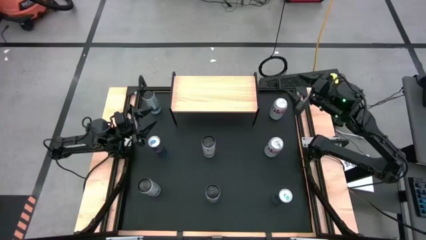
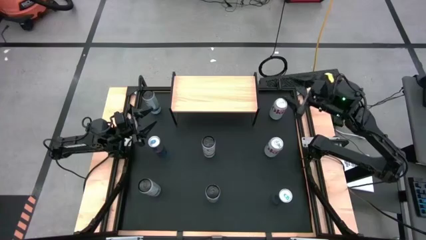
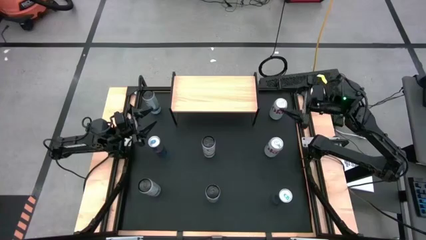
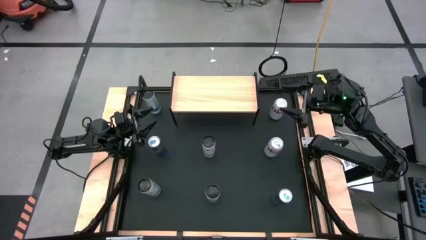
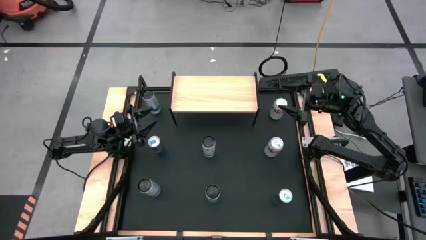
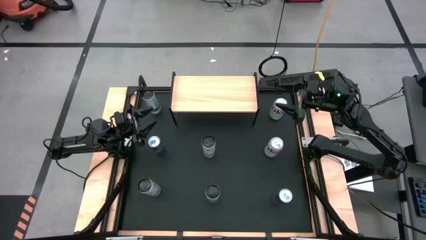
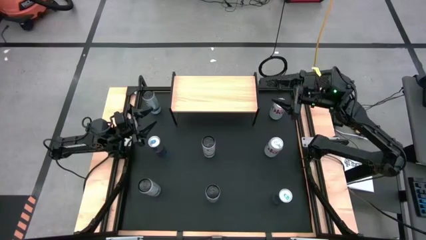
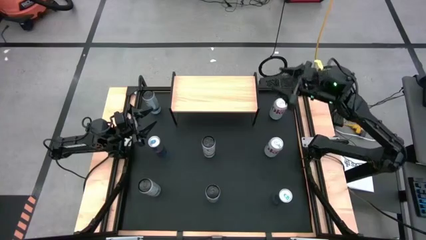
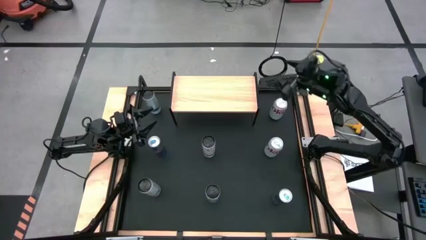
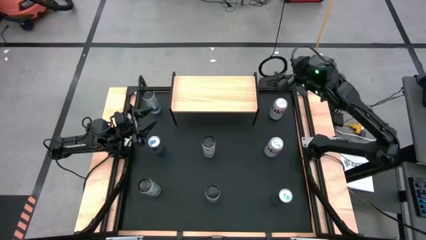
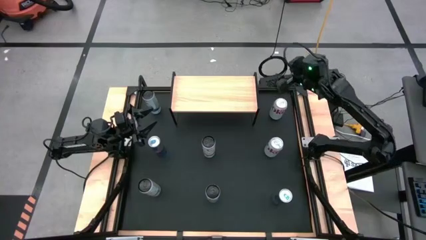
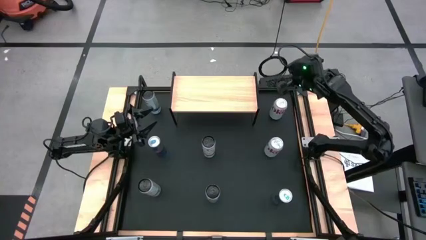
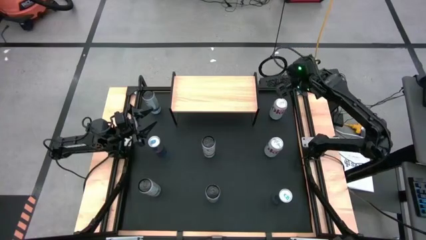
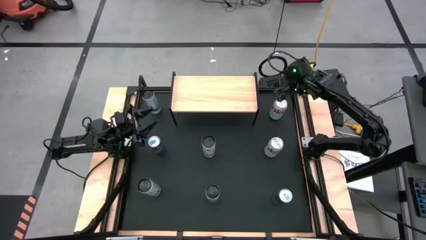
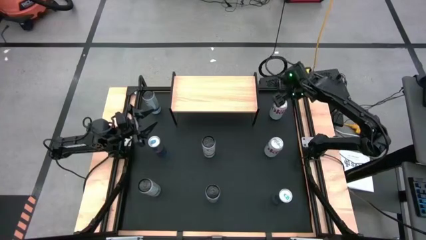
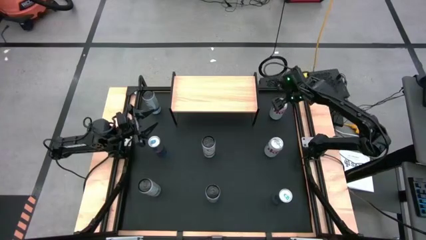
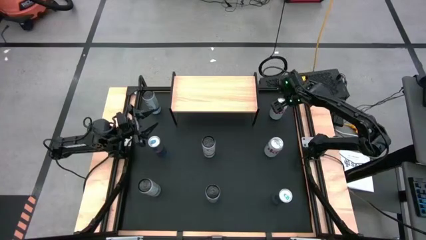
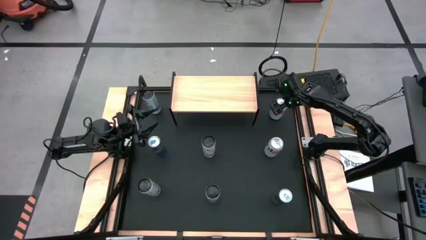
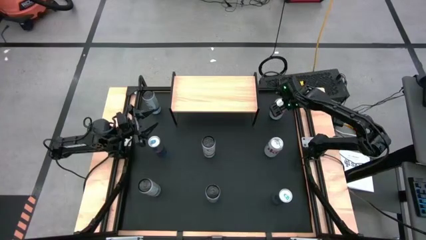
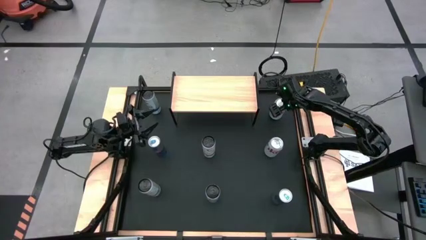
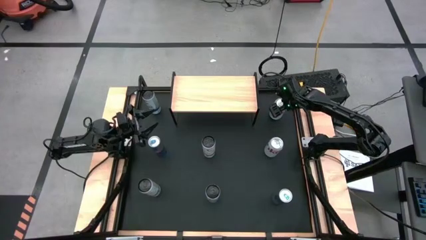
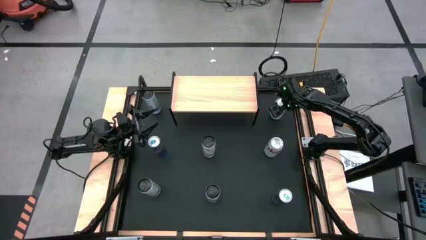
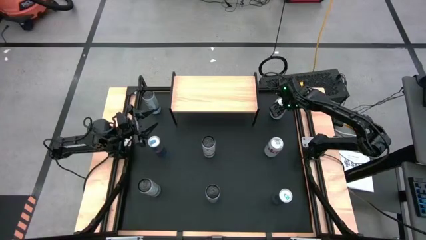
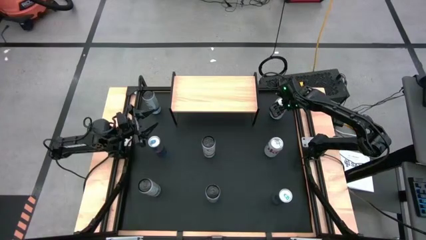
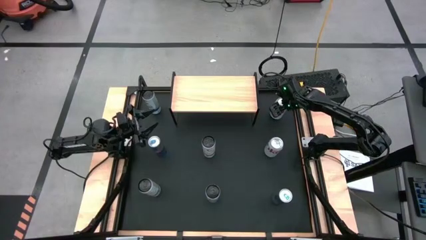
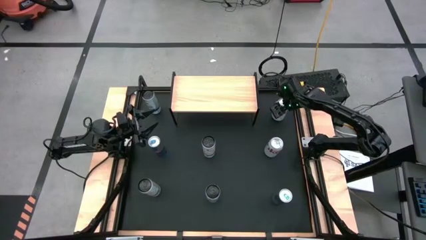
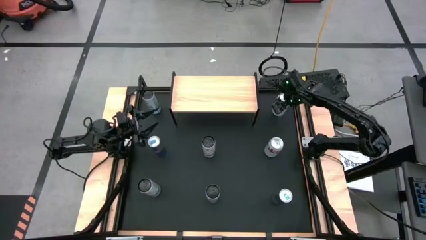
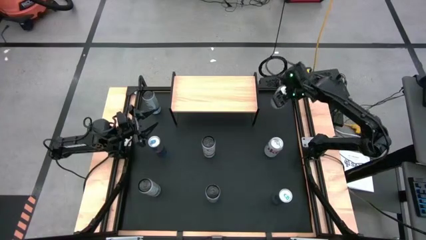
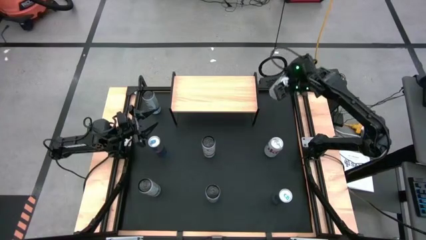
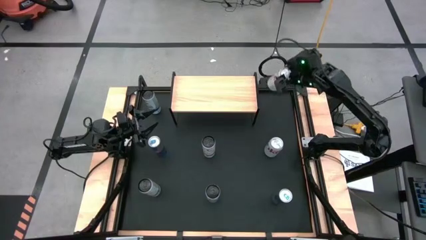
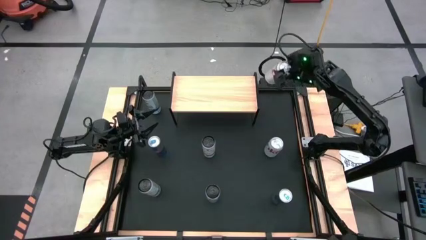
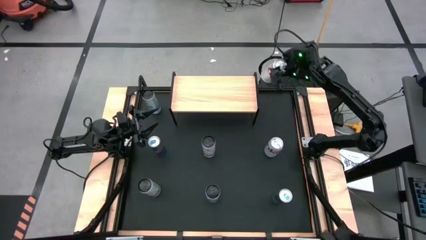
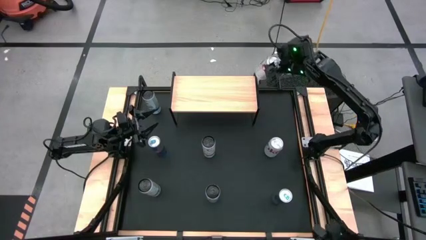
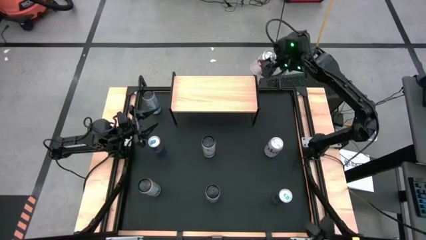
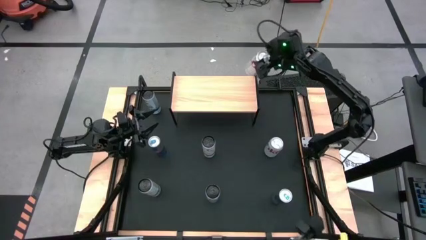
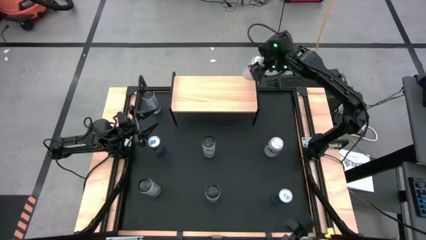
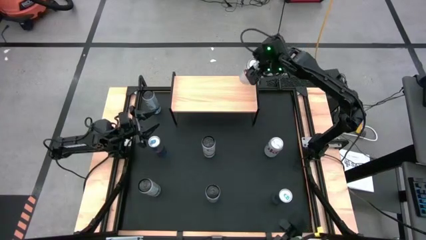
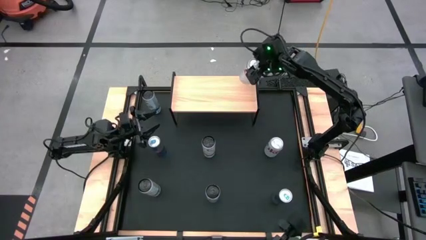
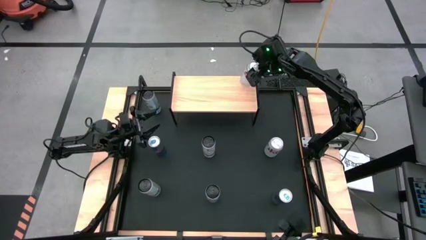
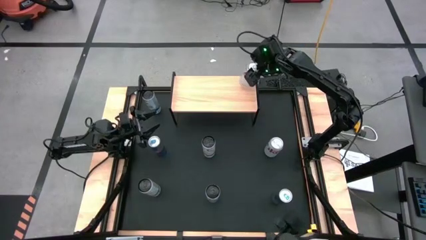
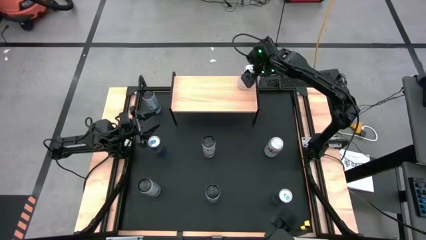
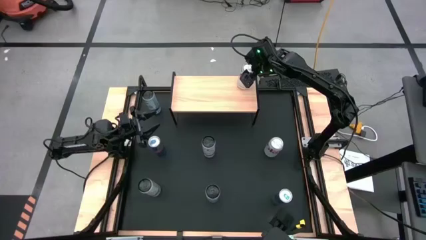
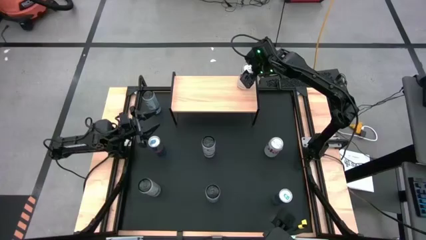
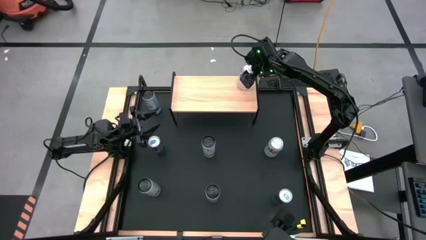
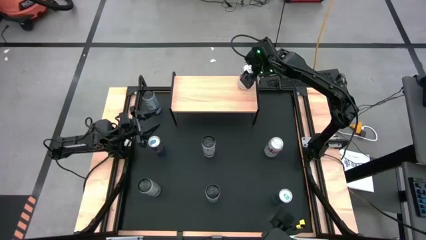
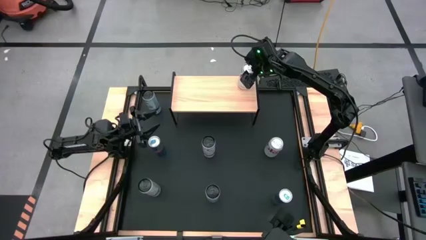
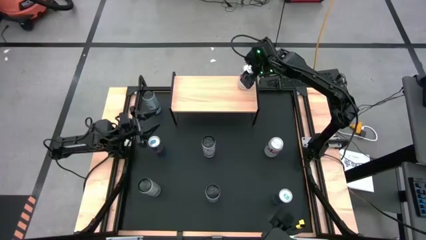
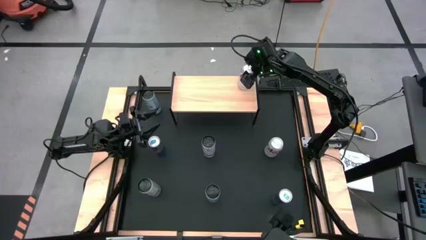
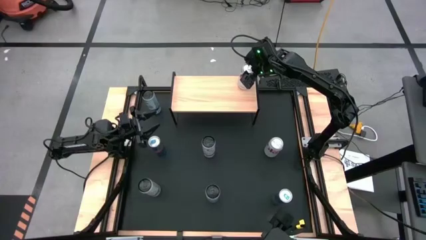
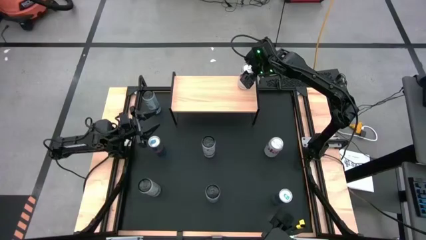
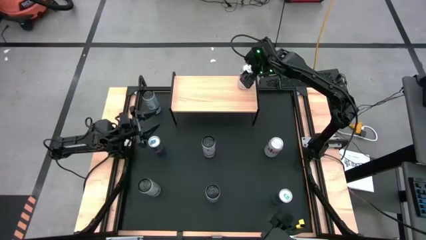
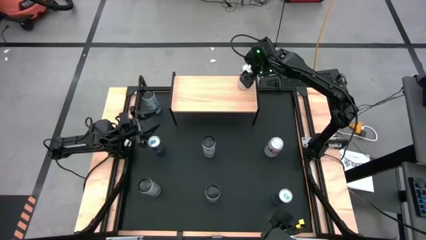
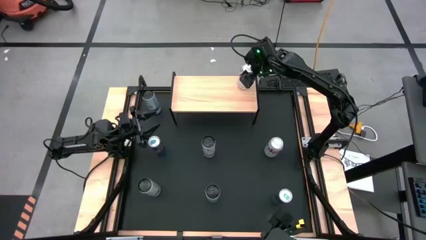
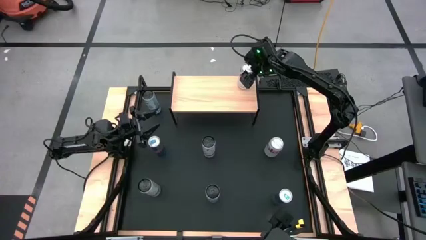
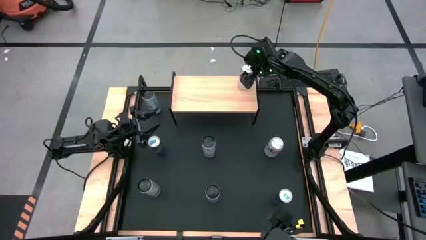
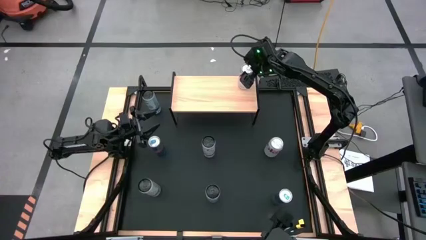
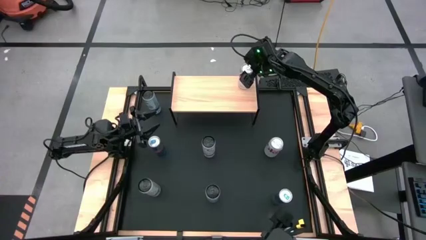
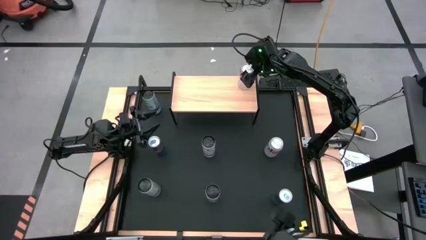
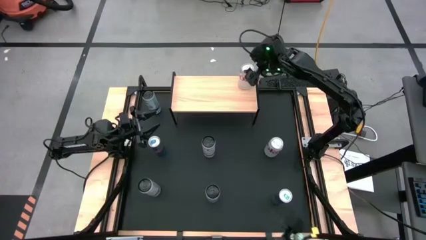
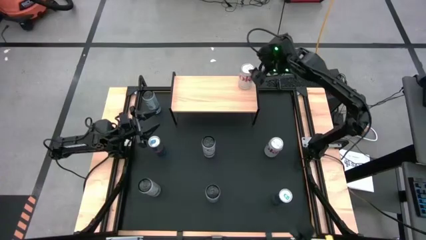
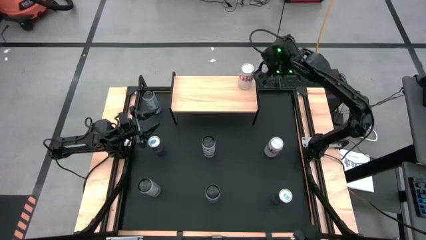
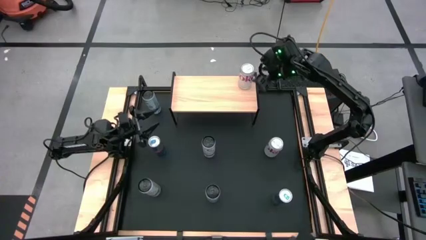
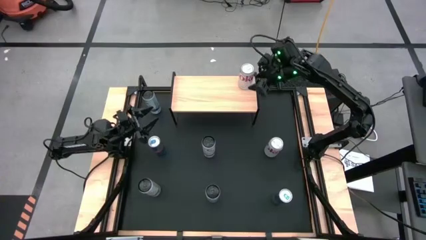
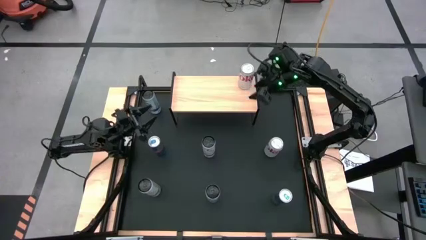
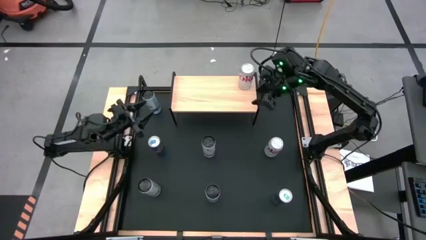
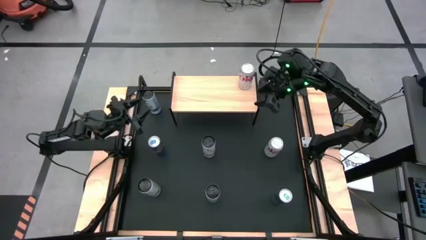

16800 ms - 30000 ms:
Task: Place canned beverage on shelf
Put the top white soda can on the shelf

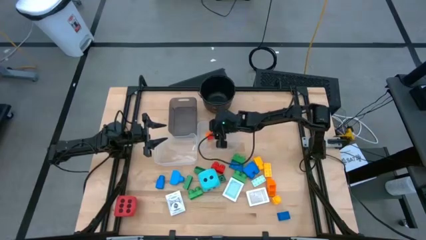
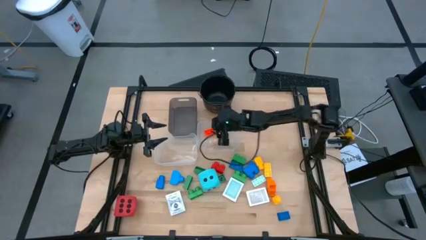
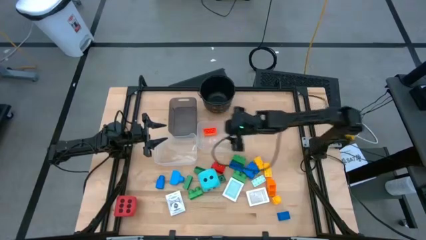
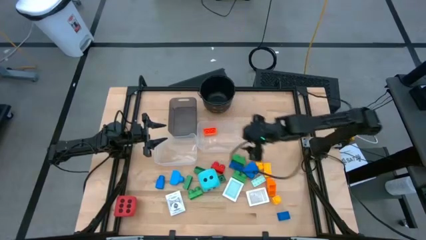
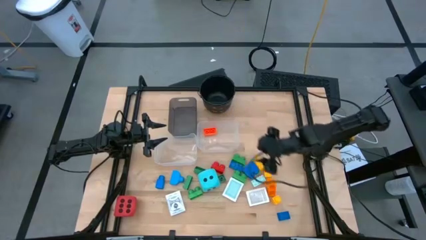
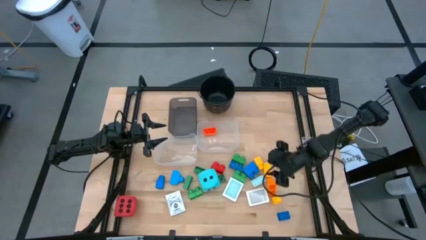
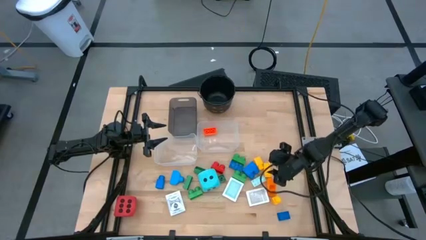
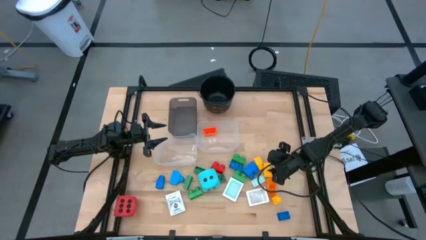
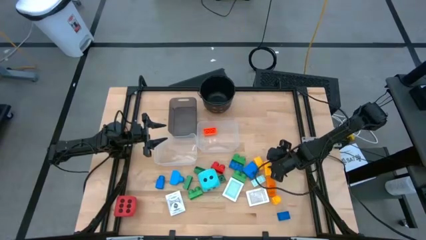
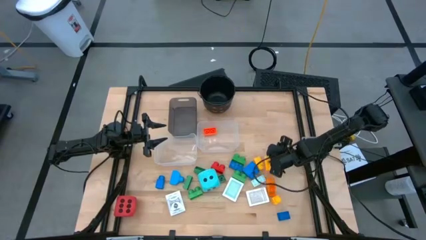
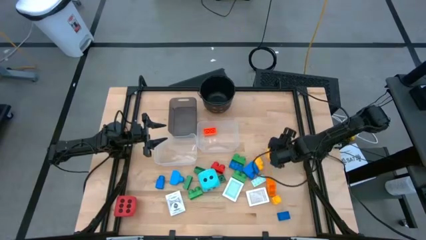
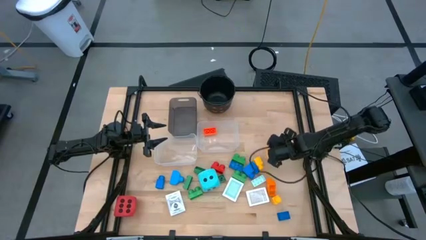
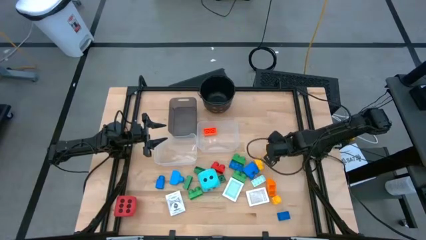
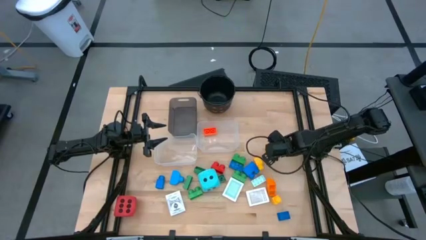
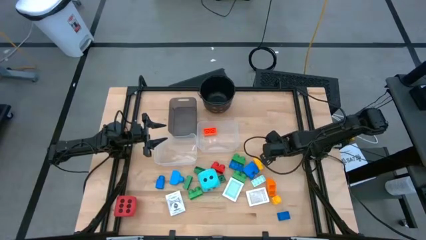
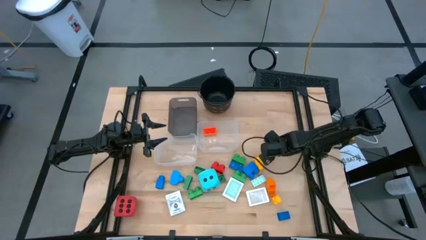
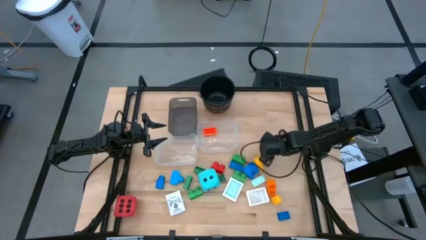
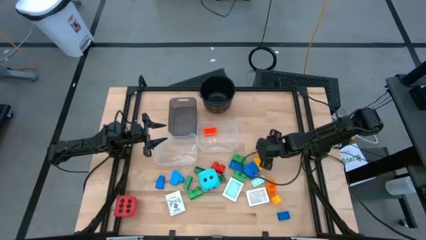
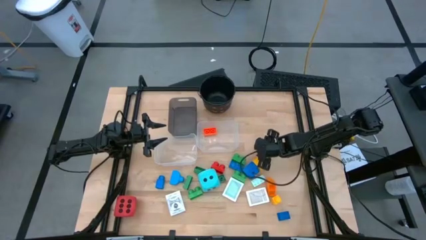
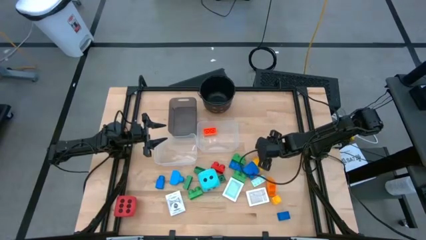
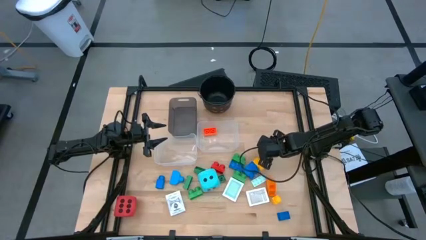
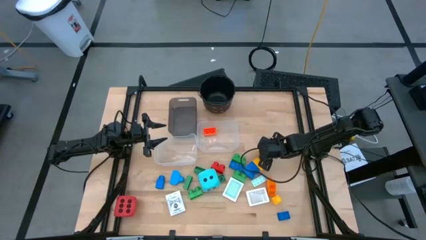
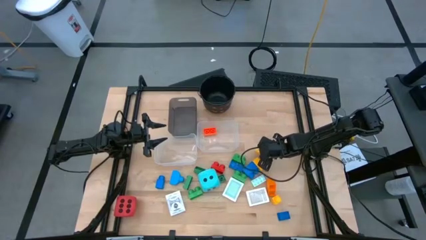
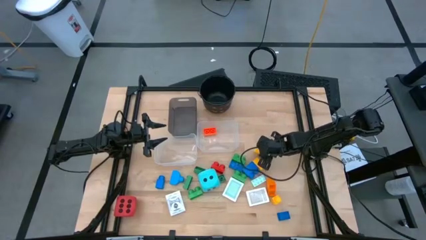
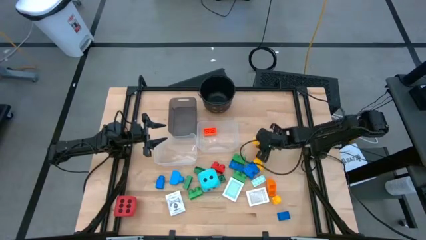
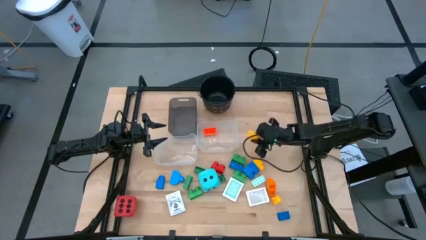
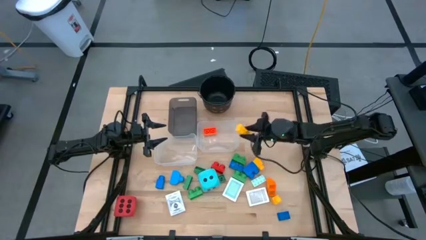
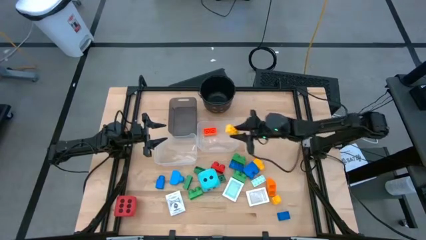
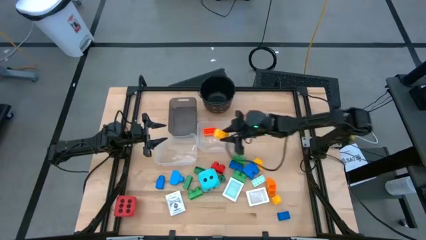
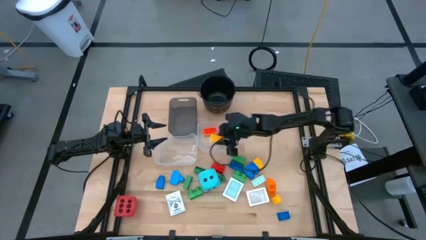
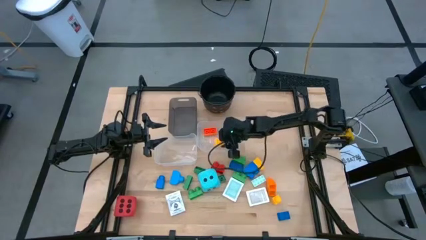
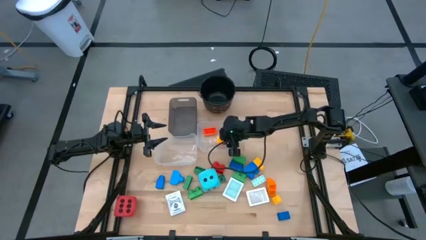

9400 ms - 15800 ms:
Task: Pick & Place Toys
Put the yellow game piece into the right transparent bin
